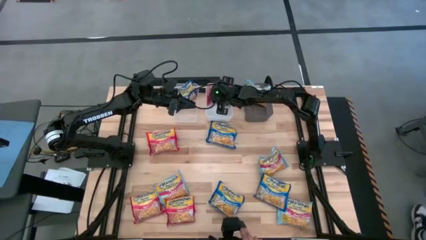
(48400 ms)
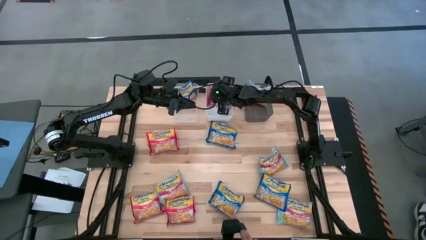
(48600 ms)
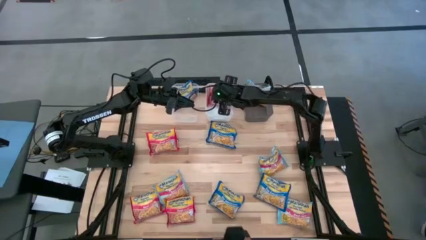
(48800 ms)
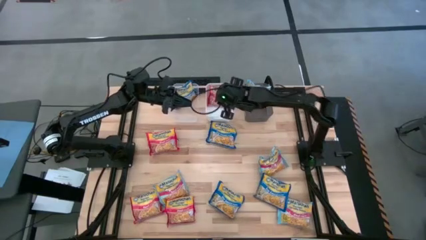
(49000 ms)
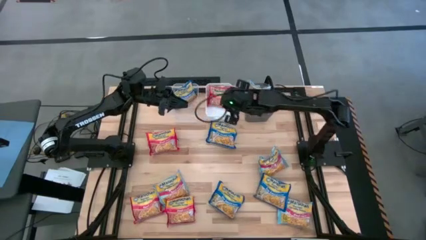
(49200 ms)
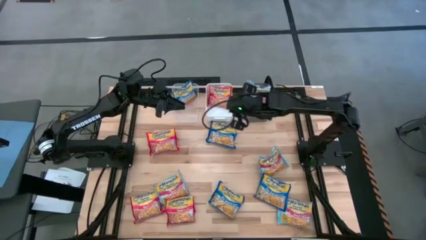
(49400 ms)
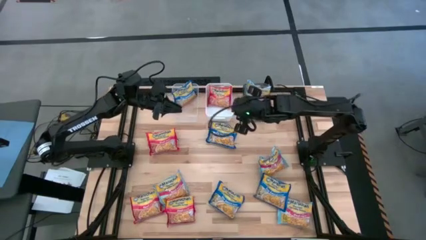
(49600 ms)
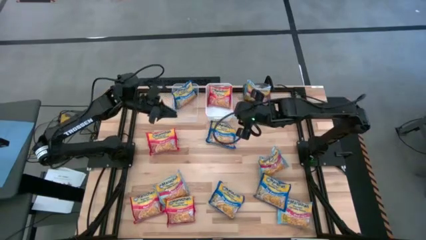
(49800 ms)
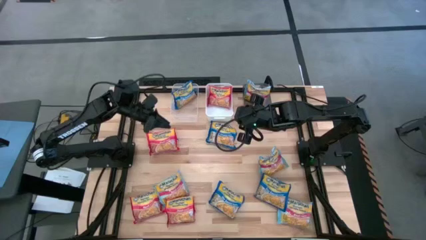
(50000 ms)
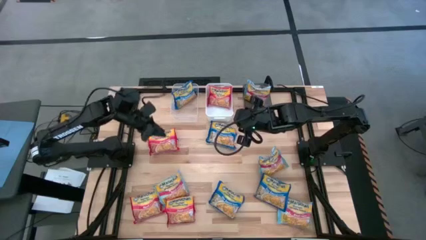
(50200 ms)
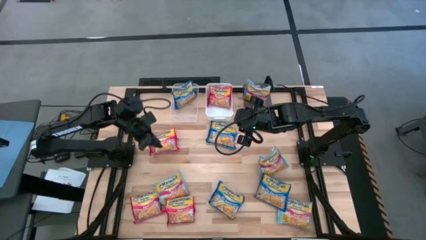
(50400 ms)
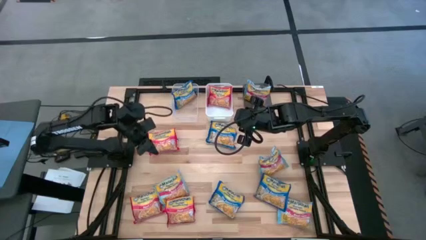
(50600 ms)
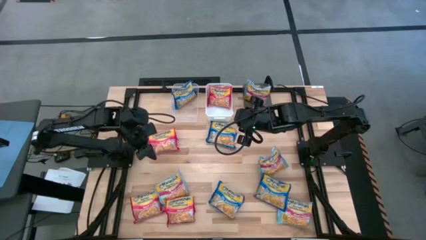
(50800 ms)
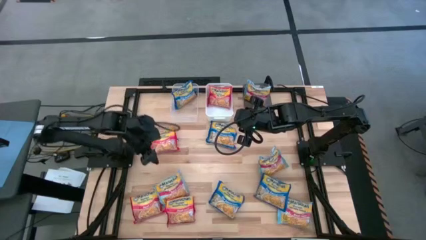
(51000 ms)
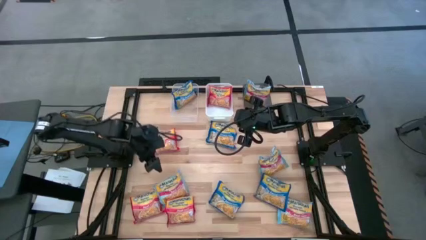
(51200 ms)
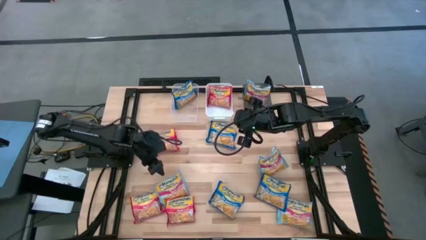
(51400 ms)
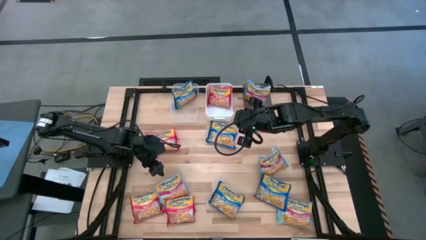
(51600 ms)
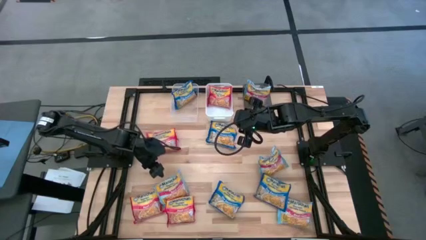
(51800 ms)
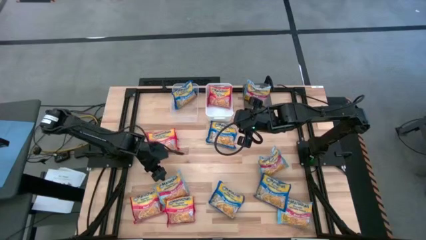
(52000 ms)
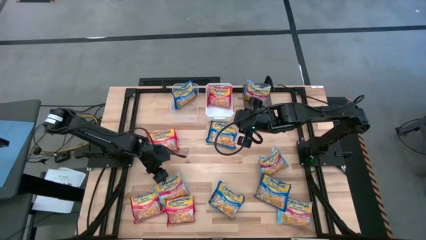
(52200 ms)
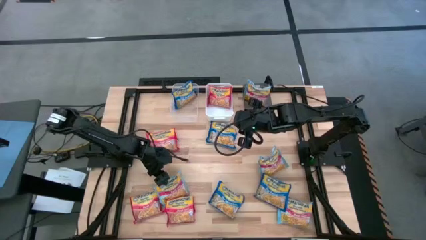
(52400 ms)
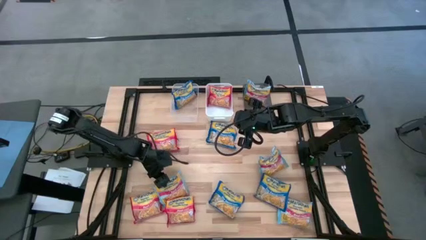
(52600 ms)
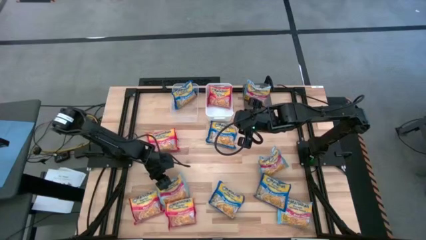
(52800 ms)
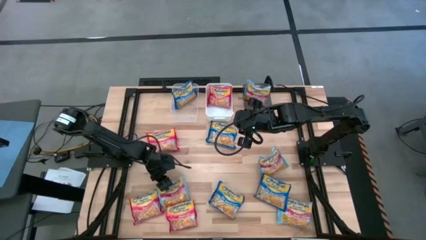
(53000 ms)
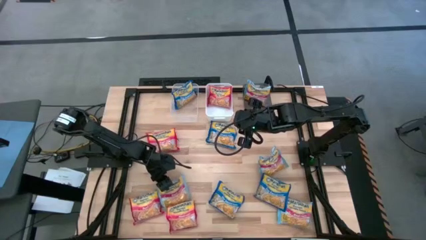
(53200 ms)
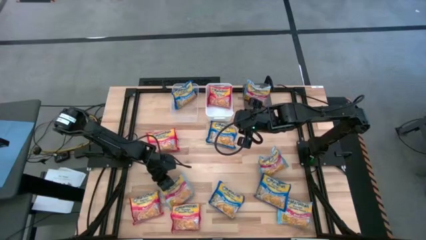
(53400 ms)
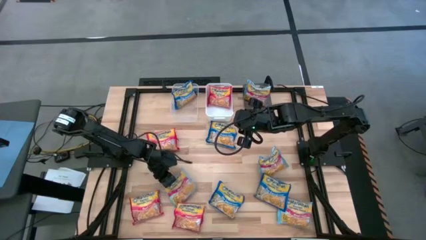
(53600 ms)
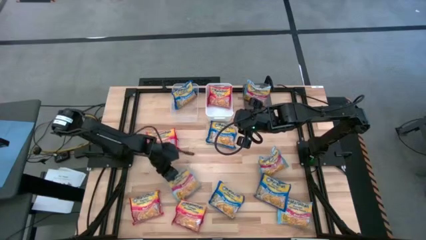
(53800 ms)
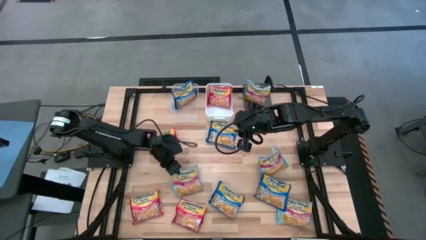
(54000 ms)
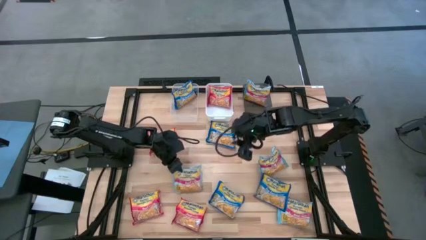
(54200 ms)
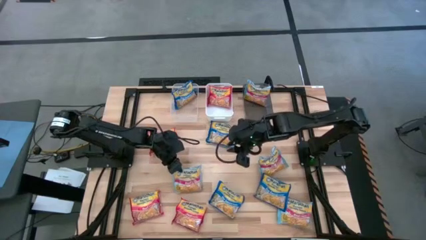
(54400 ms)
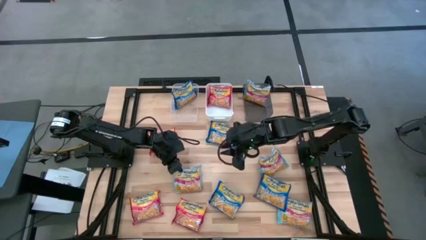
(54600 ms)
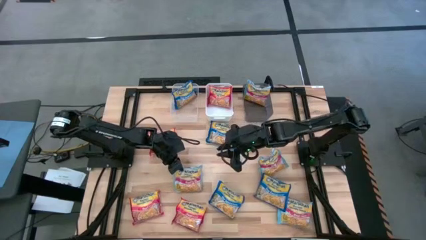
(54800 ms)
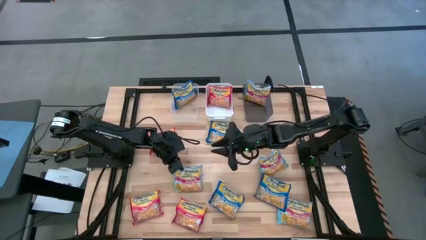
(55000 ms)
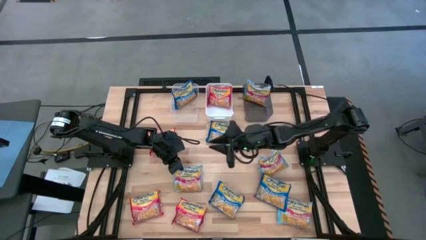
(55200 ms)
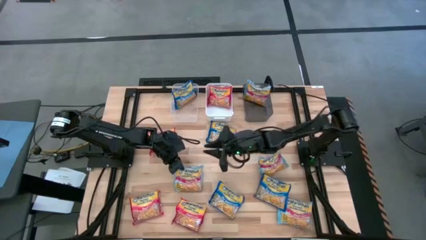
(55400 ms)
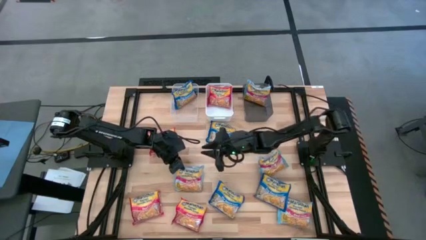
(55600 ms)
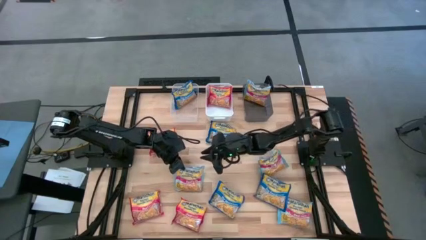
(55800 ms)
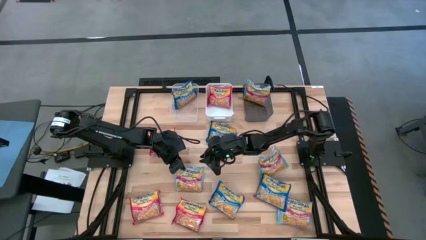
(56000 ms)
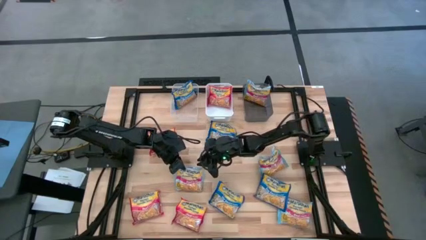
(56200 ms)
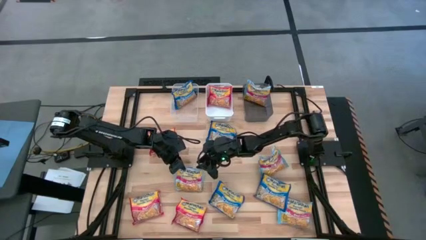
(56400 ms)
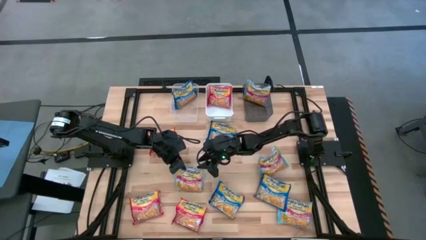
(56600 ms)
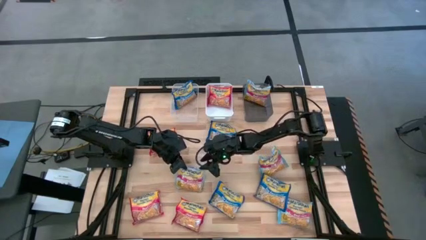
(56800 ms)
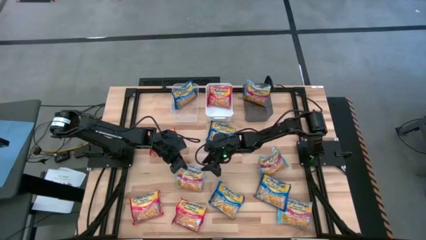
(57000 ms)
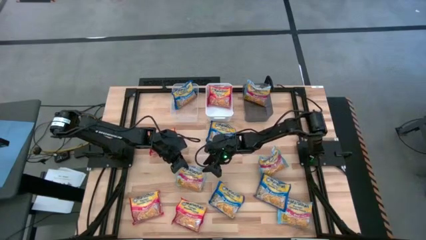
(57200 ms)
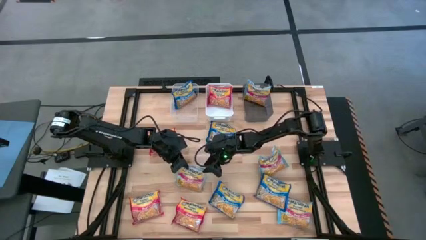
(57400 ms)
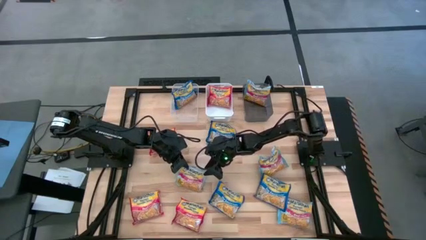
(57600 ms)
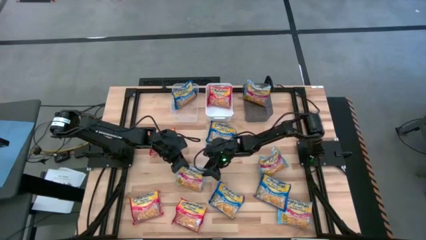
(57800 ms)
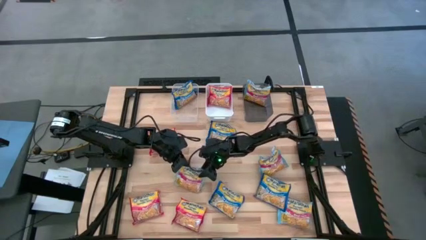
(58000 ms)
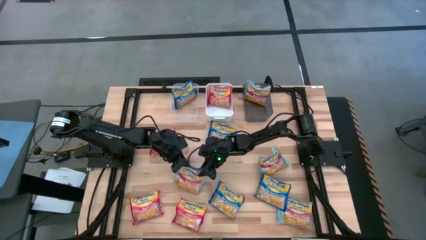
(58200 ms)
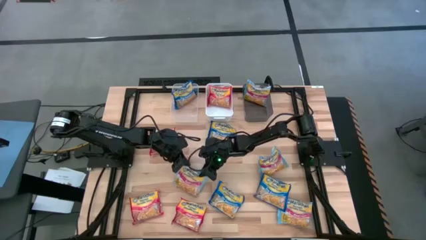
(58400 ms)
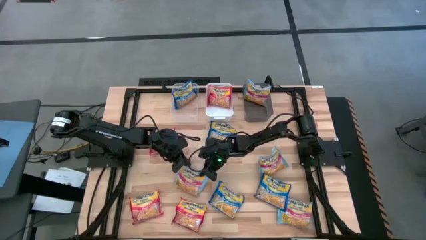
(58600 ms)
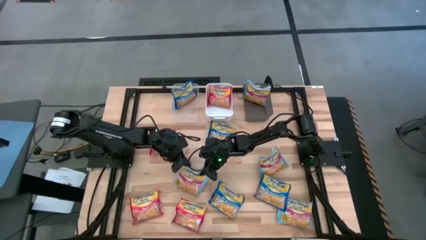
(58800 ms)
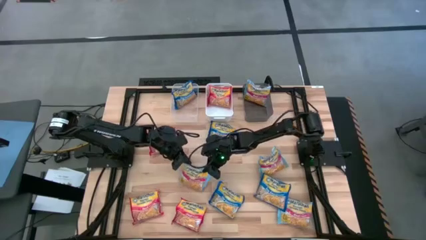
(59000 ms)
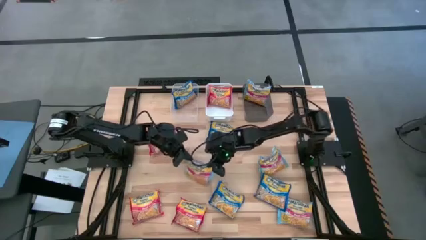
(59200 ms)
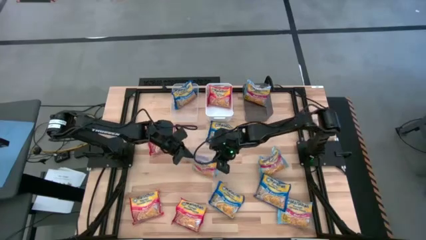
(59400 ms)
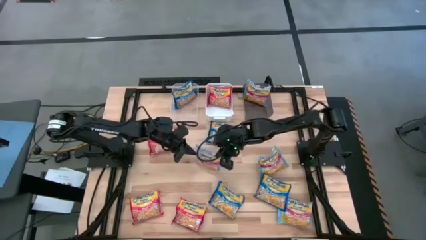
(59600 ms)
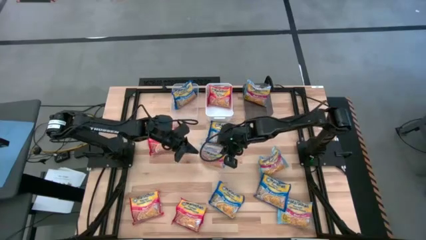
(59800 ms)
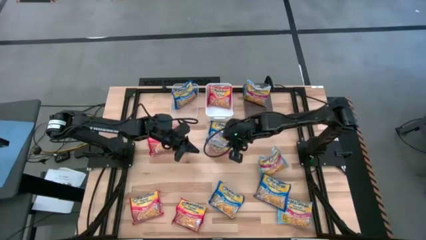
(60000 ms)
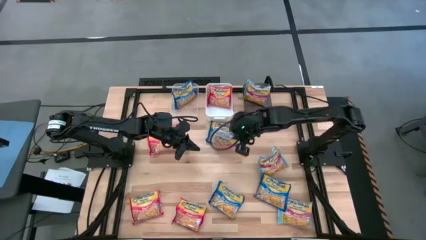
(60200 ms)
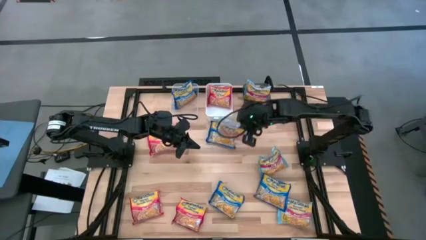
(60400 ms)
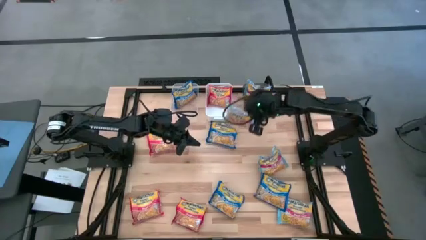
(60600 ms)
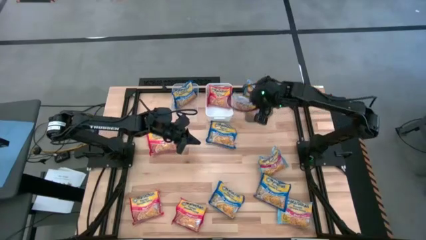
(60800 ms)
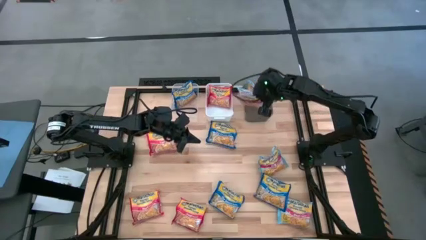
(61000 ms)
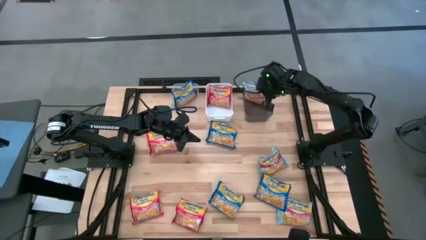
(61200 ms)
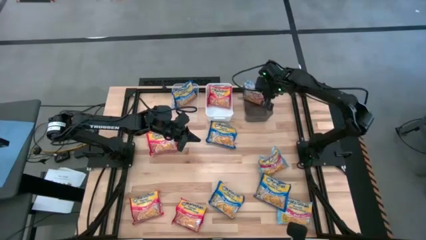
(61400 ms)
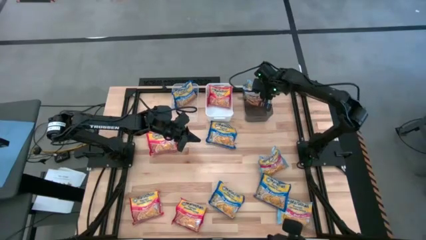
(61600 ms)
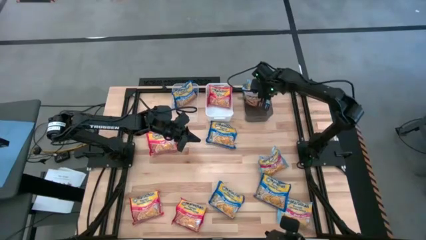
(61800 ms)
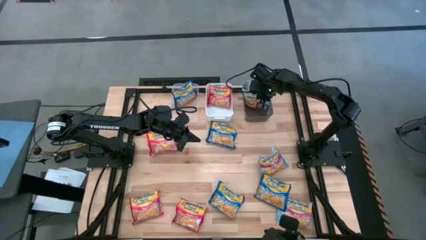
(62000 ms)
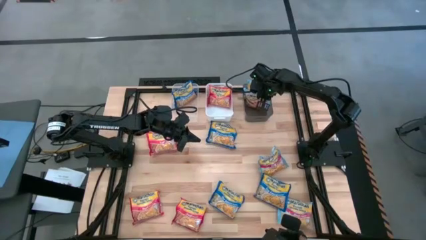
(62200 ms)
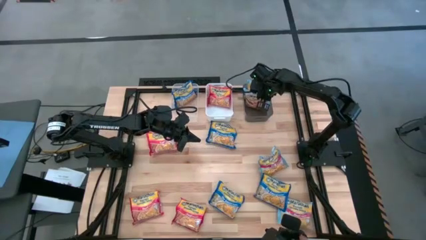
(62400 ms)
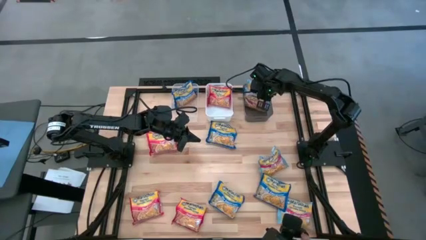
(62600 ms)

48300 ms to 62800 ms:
Task: Sort Maruchan noodles
Put the light blue noodle pack into the black bin
